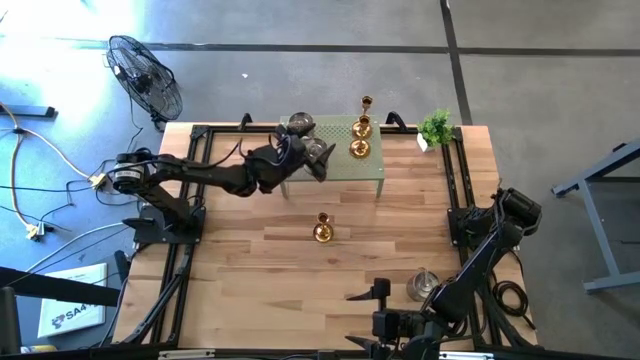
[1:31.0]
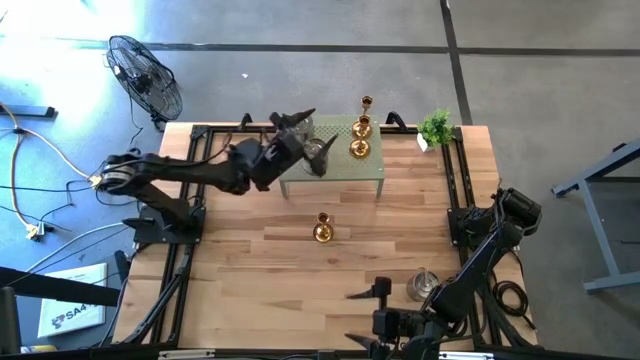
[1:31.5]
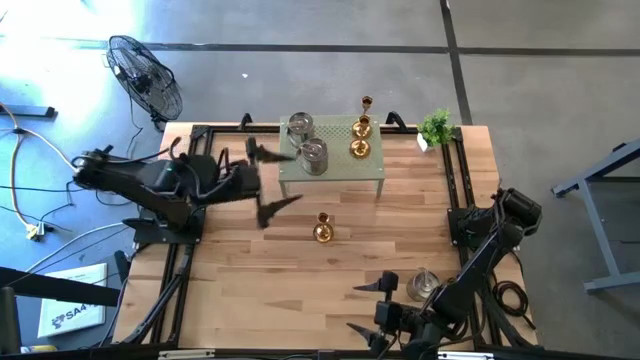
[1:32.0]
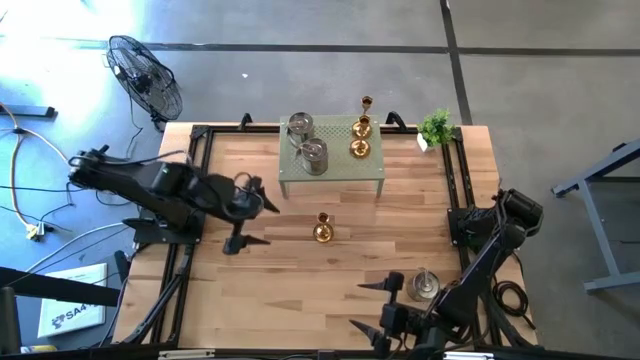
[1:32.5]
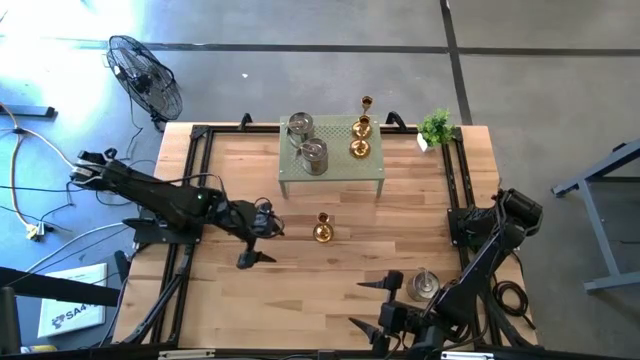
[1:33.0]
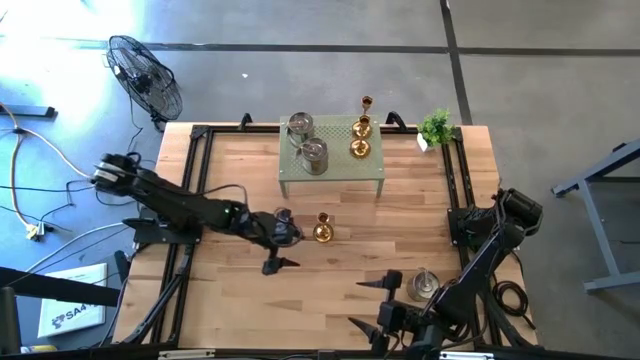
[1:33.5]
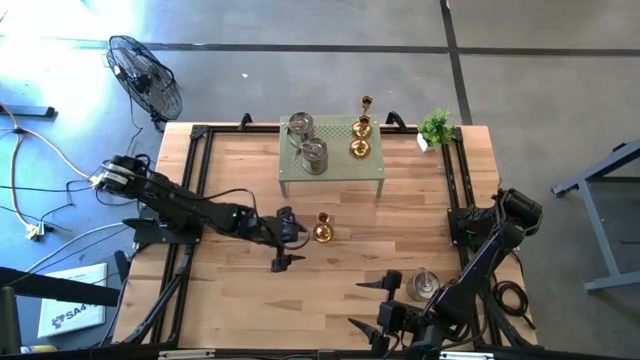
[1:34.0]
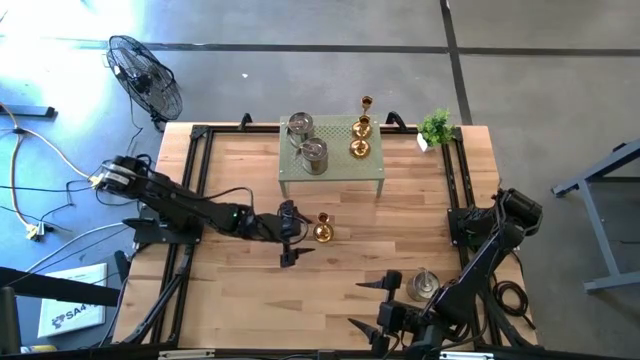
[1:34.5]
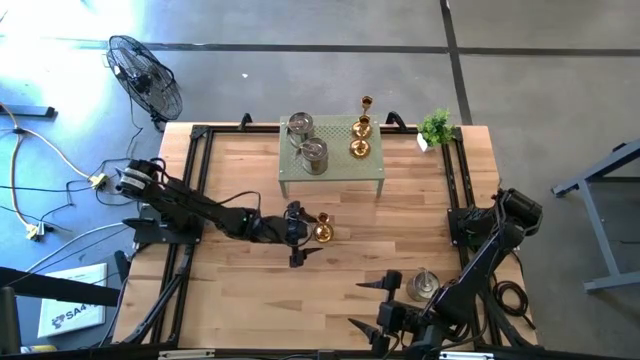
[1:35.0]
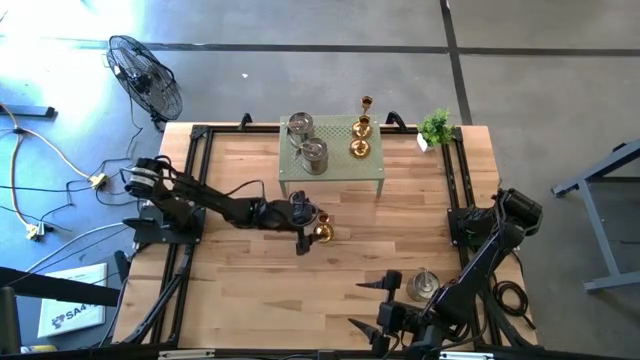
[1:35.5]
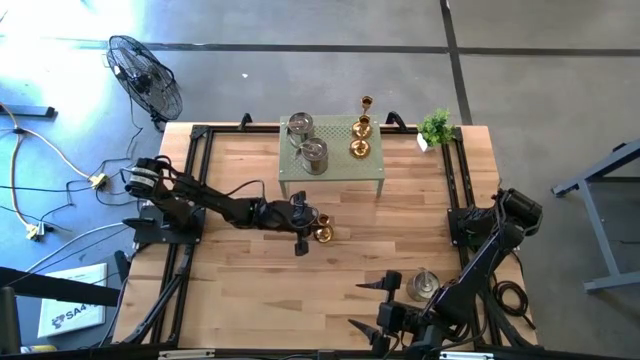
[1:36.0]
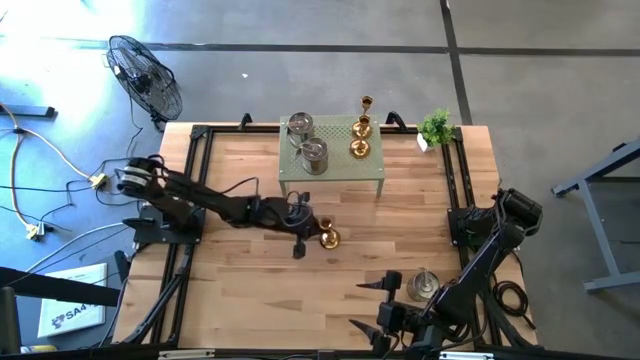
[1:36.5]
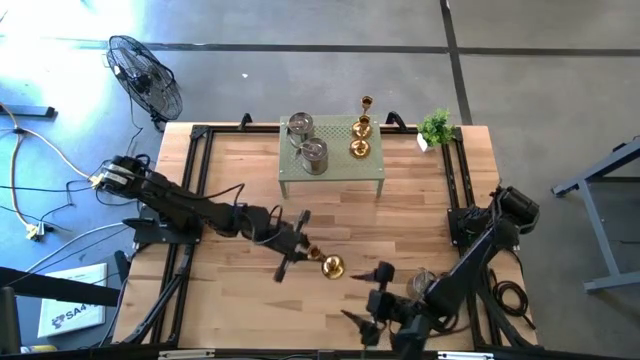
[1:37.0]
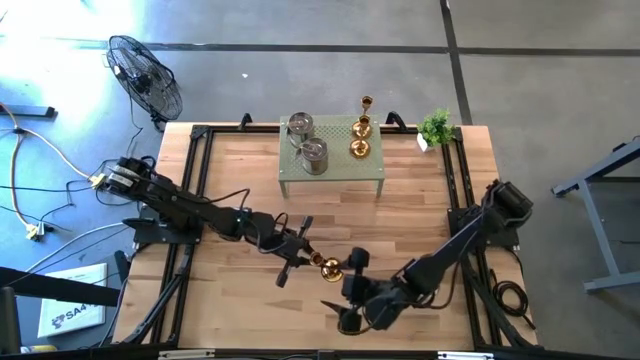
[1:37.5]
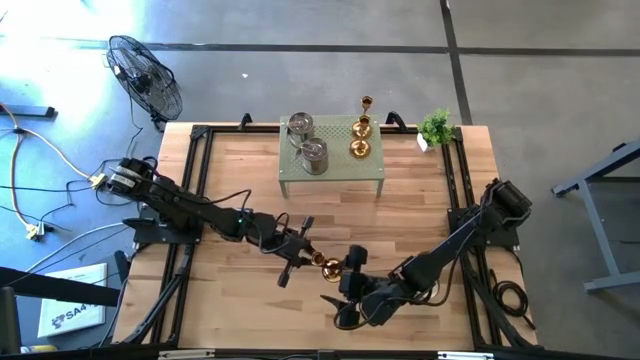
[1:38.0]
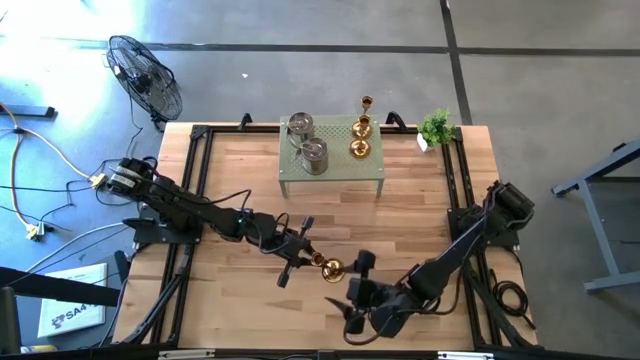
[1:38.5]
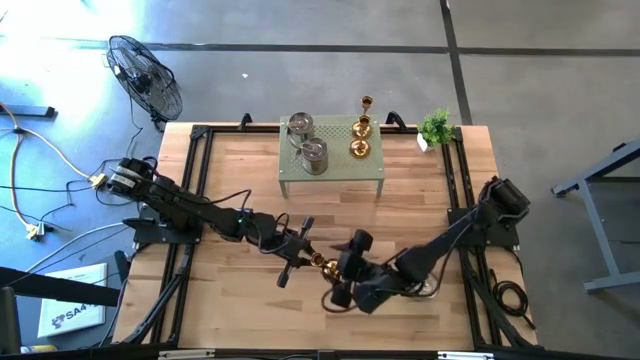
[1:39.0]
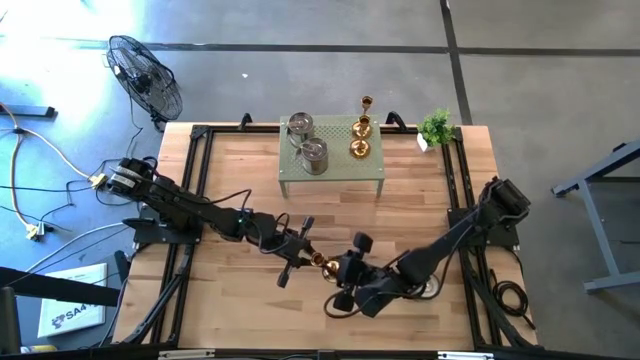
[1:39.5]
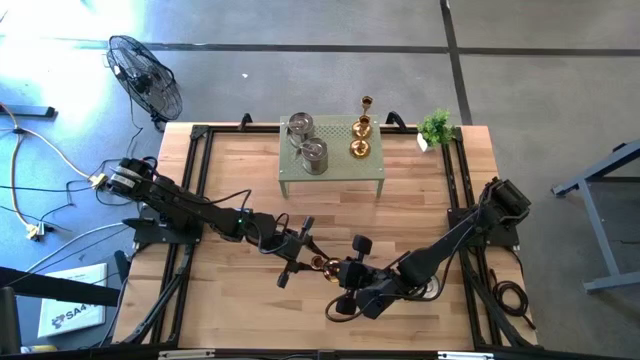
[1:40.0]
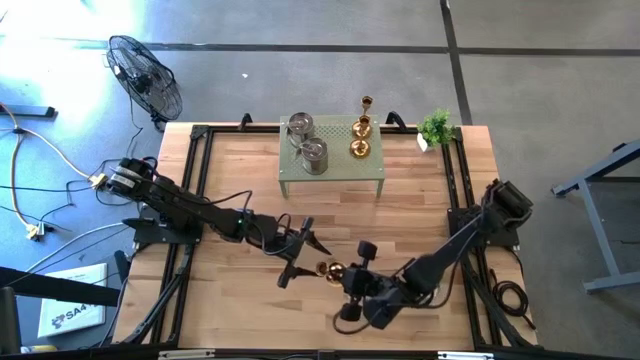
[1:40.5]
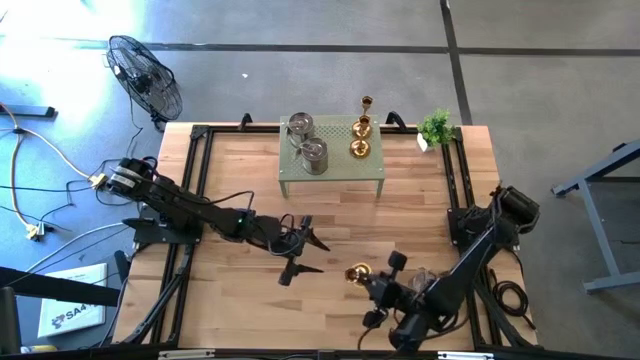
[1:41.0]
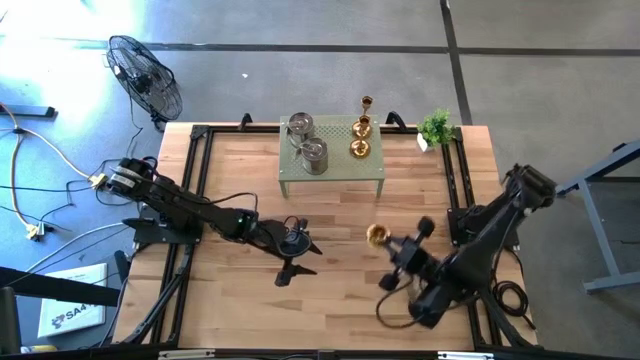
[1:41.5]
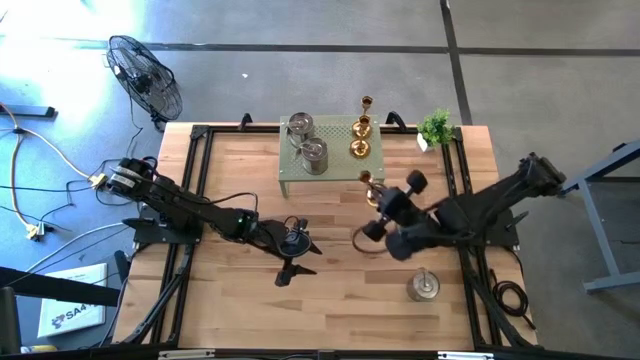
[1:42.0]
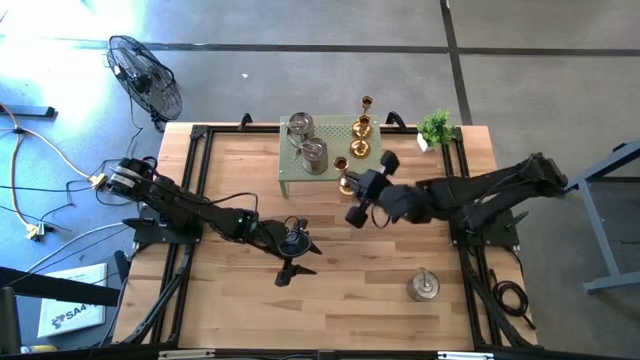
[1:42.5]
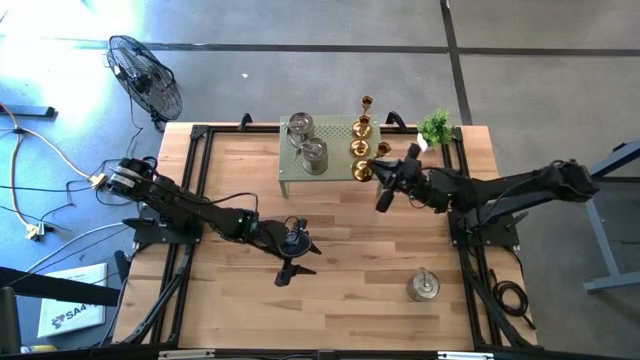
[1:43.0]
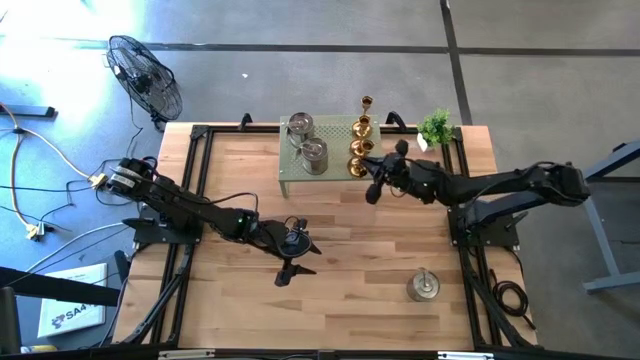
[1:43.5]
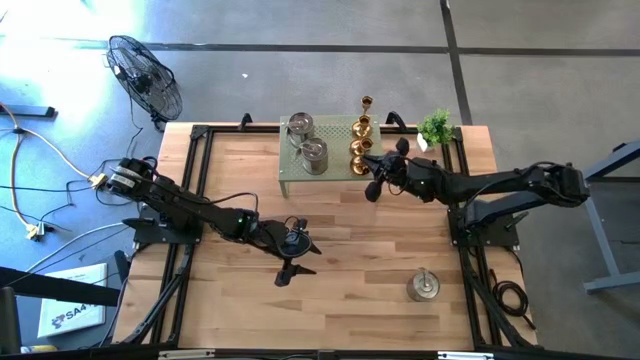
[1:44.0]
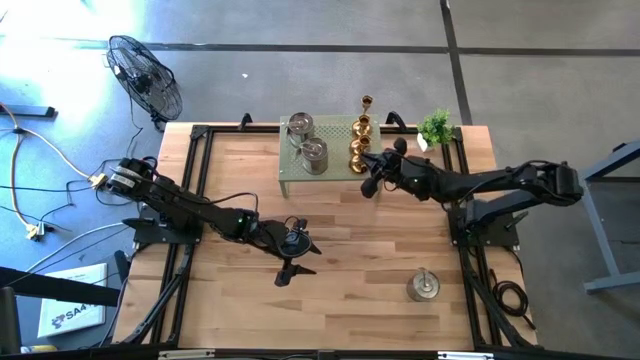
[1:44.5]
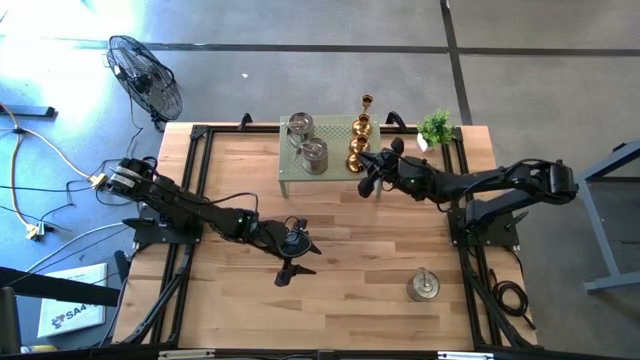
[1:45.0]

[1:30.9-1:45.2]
Task: Pick & Place candle stick holders
Put the gold candle holder on the shelf

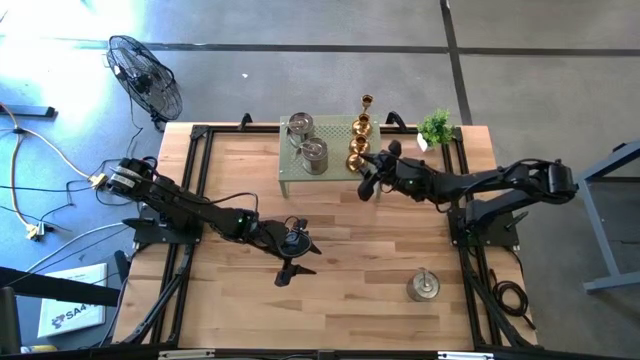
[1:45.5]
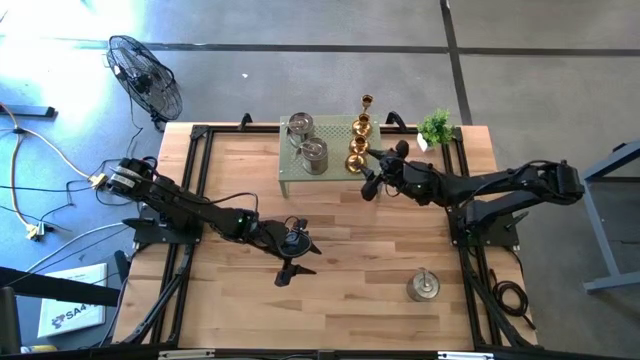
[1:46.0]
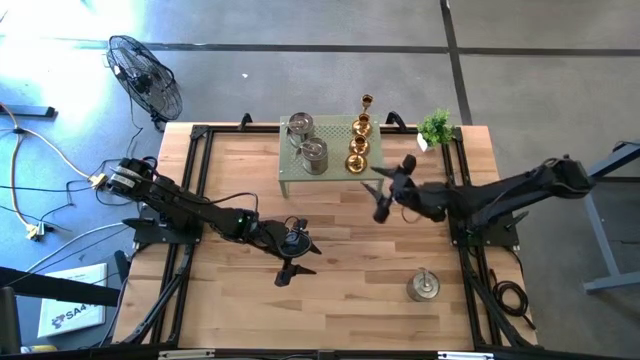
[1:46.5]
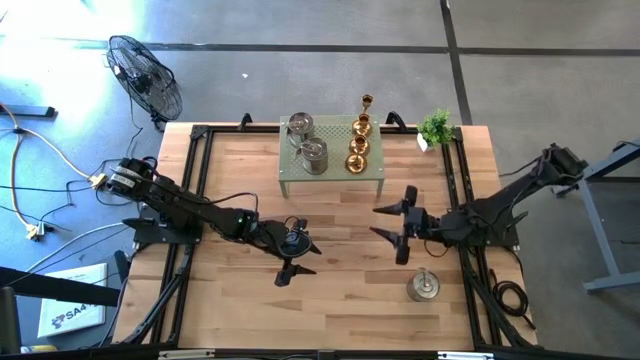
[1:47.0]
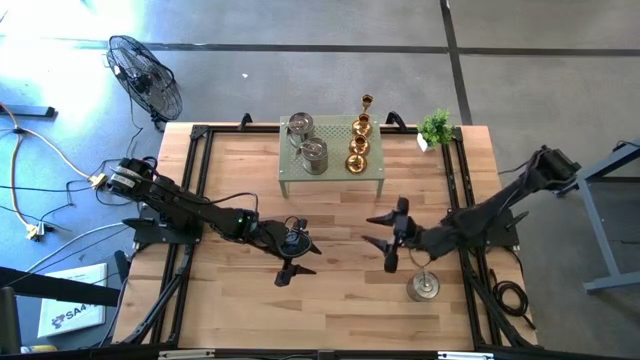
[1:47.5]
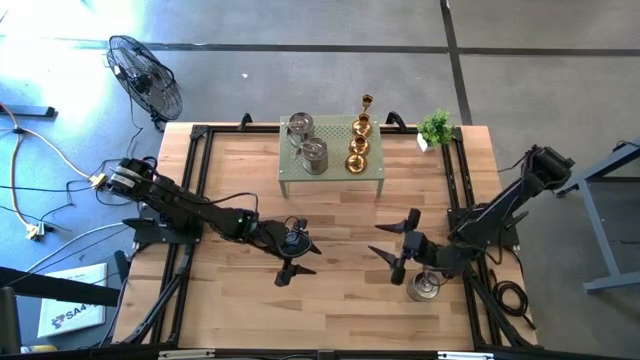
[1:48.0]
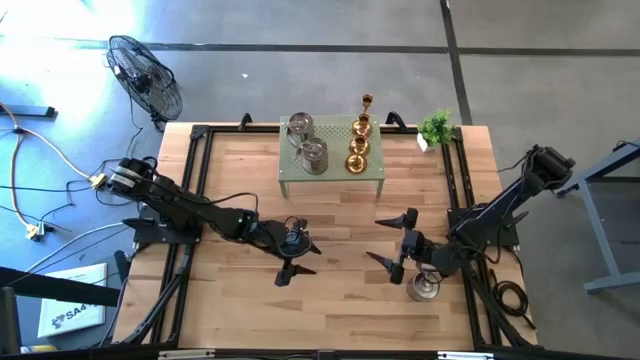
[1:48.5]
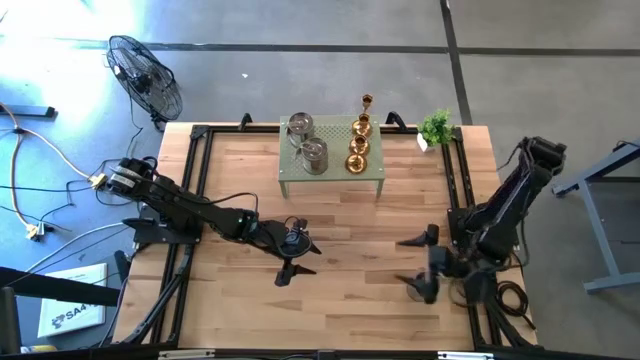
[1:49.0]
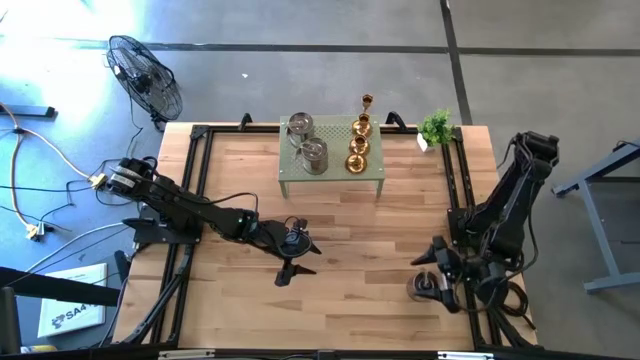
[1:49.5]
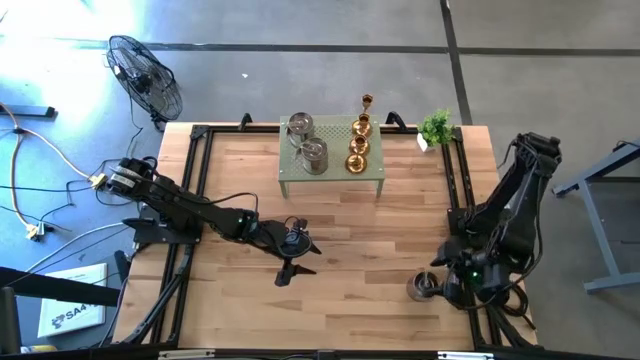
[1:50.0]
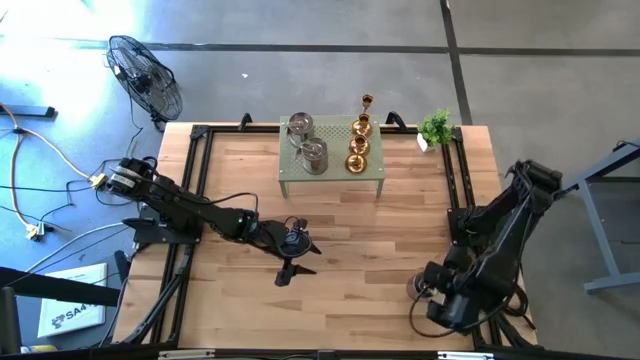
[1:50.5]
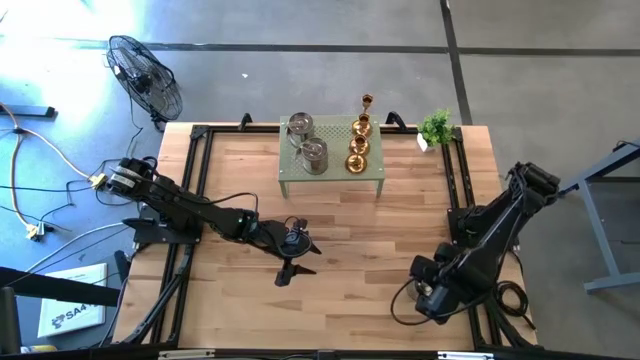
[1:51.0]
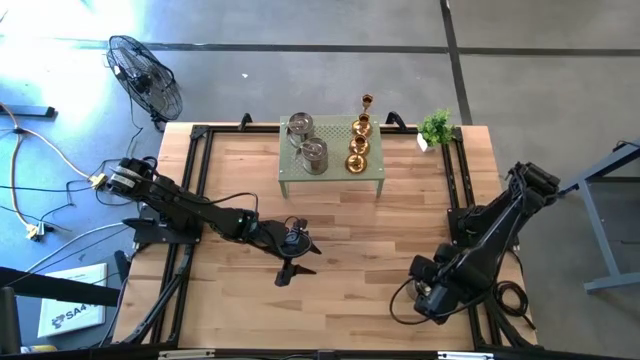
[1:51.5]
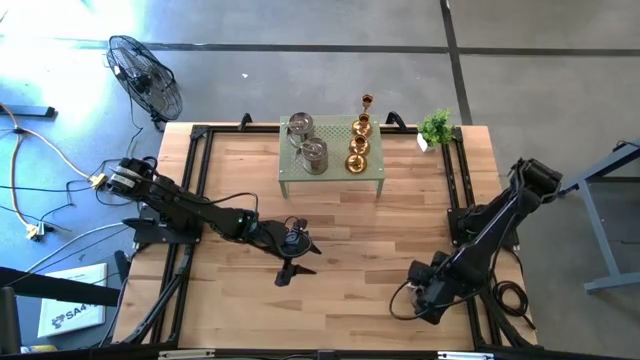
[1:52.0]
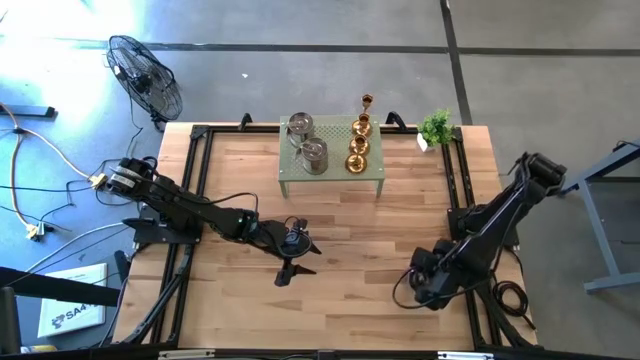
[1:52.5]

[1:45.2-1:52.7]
Put the silver scented candle on the shelf
